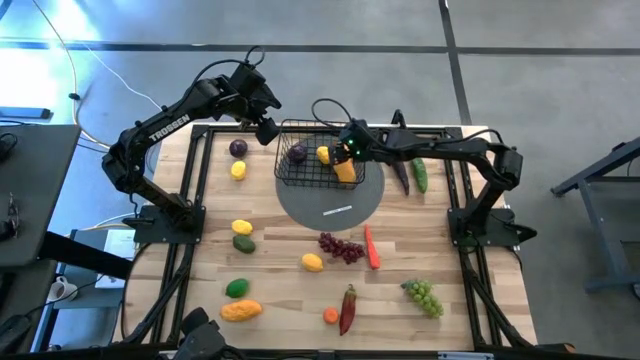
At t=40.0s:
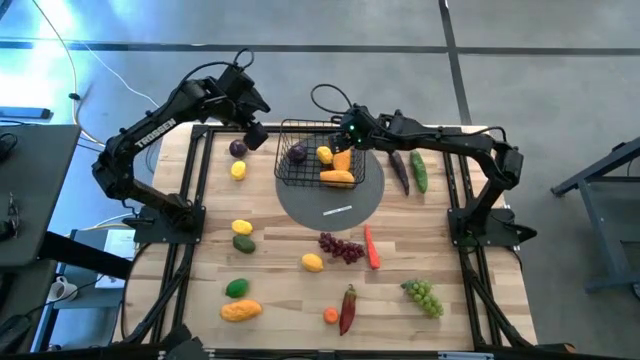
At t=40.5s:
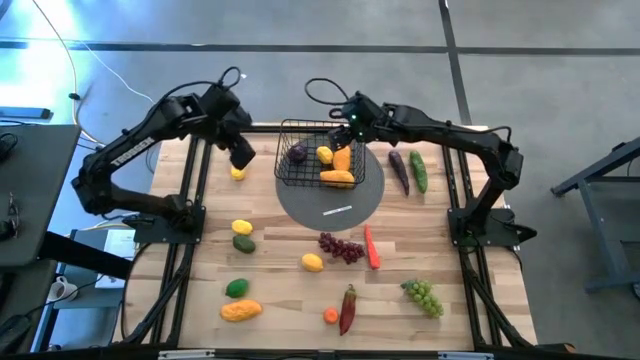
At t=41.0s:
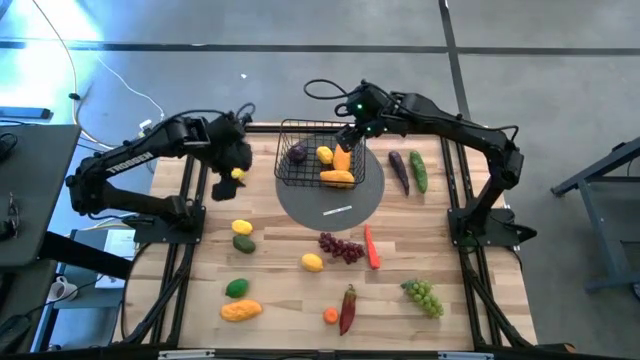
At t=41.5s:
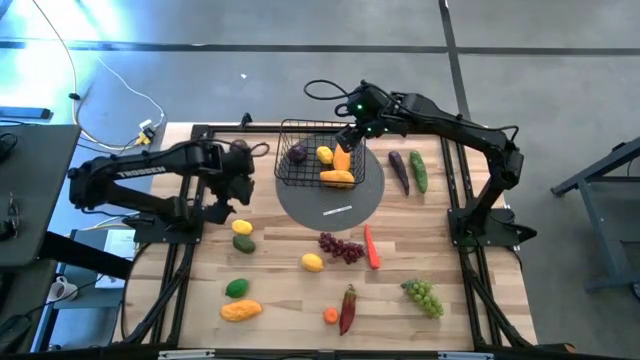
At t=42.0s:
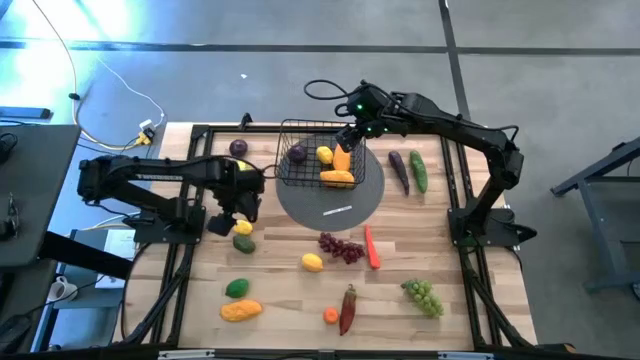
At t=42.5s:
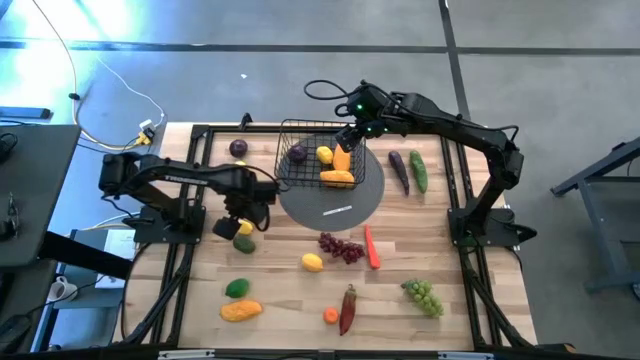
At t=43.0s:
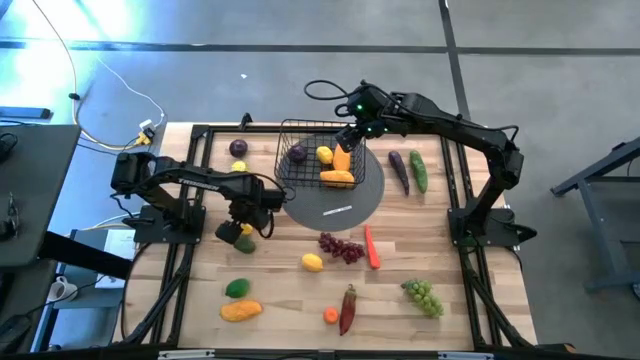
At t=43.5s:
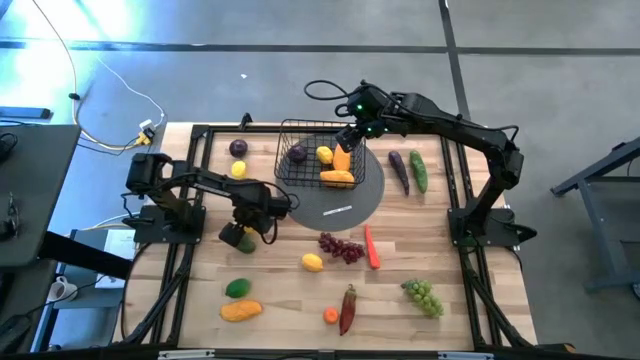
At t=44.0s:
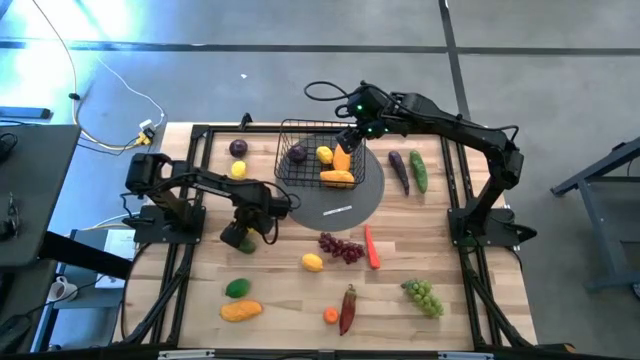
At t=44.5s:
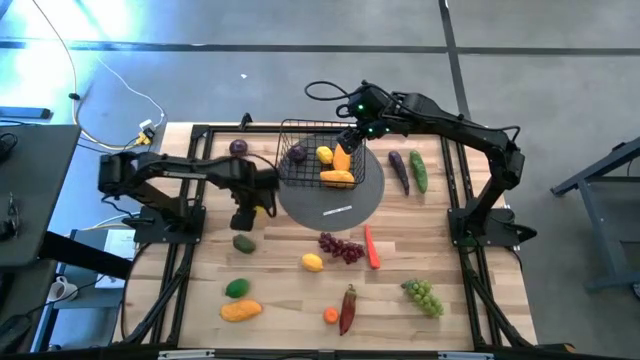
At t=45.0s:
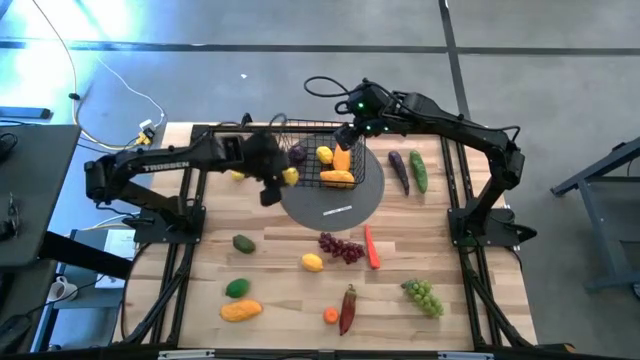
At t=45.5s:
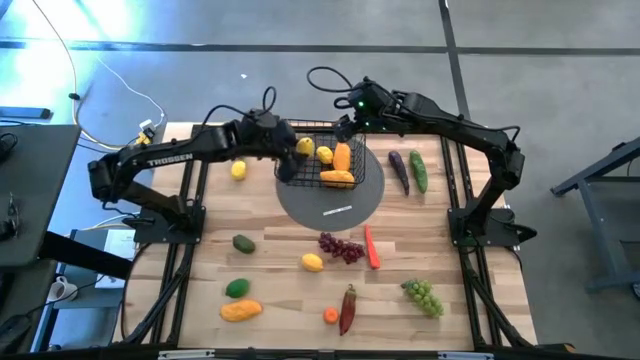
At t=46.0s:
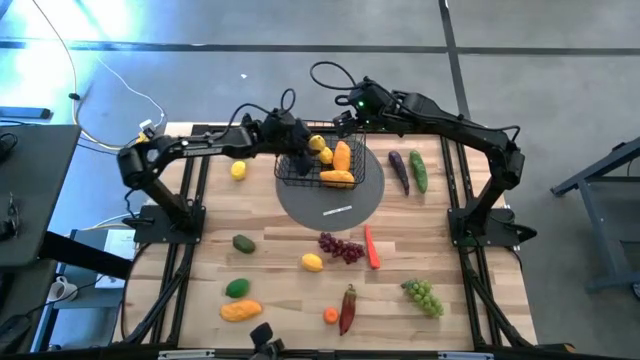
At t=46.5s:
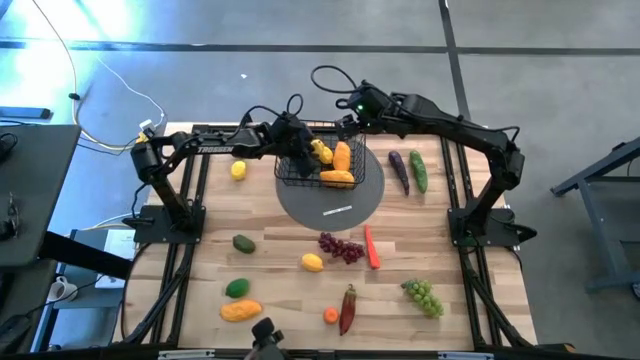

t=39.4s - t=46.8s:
Task: Build produce basket
Put the middle yellow lemon into the black wire basket

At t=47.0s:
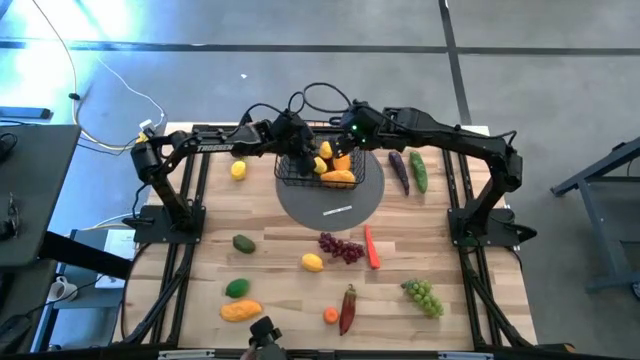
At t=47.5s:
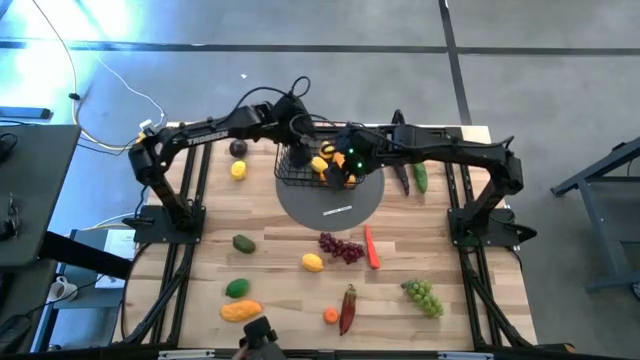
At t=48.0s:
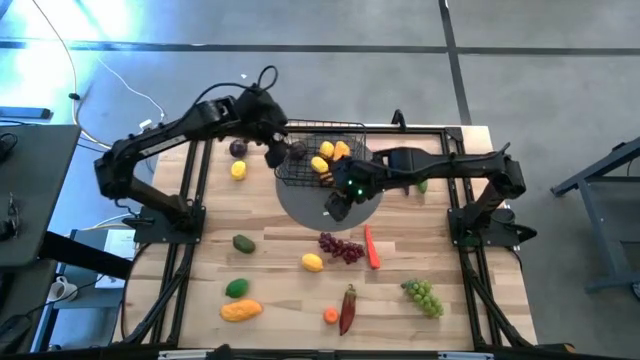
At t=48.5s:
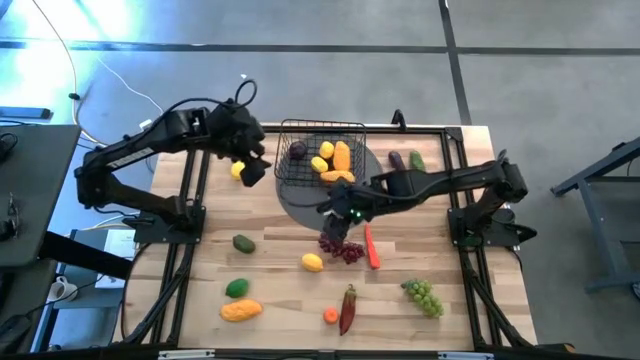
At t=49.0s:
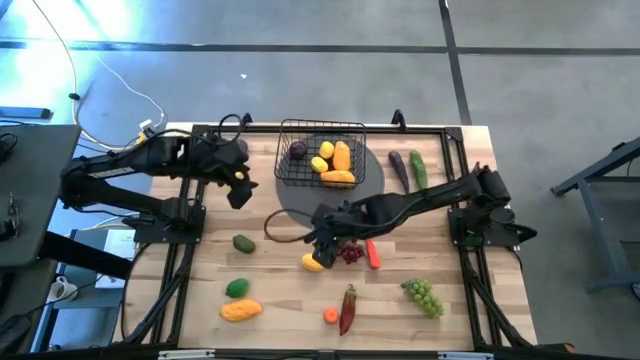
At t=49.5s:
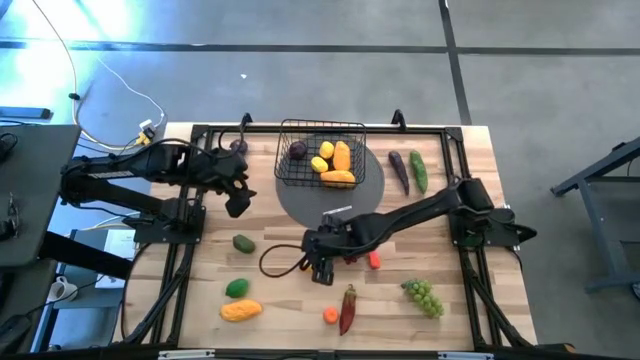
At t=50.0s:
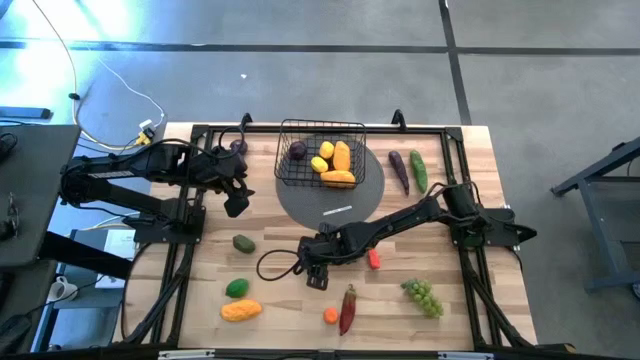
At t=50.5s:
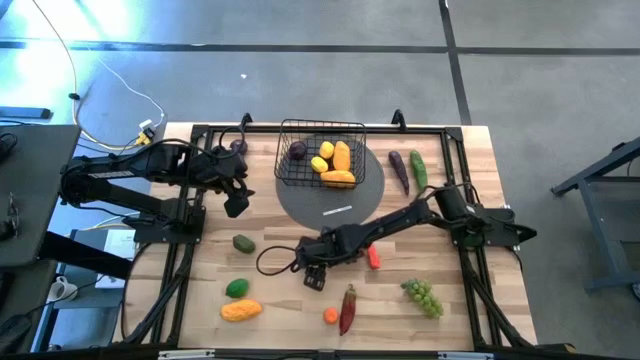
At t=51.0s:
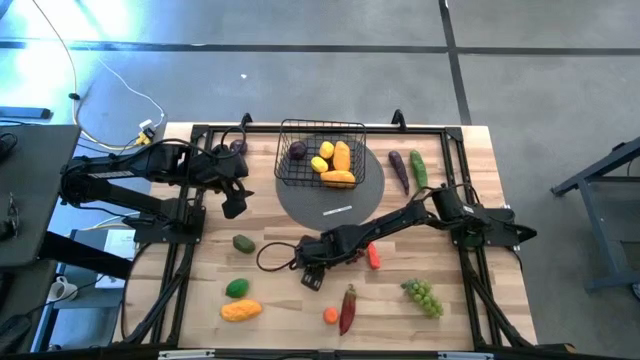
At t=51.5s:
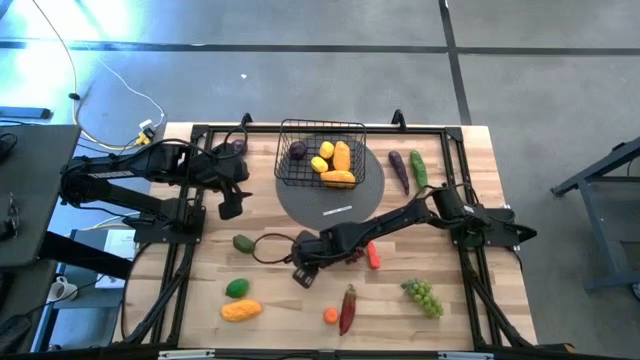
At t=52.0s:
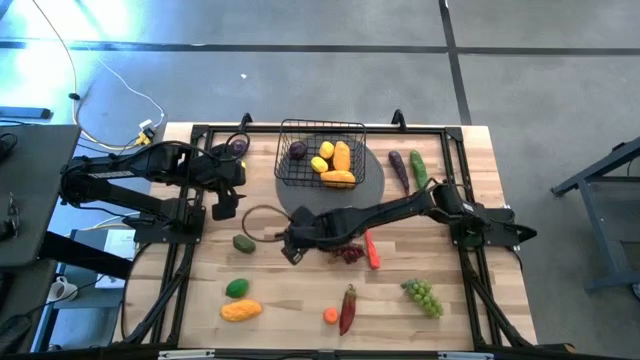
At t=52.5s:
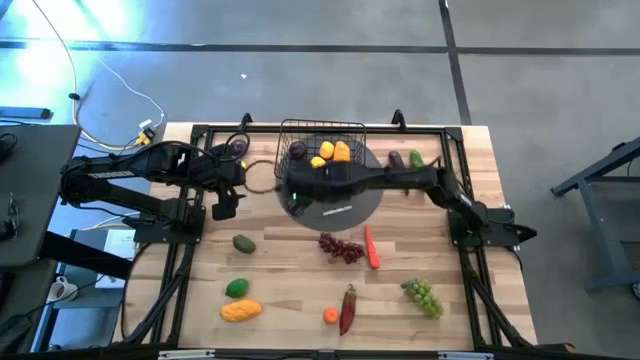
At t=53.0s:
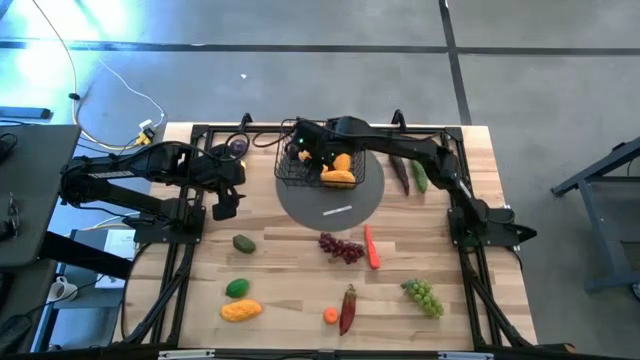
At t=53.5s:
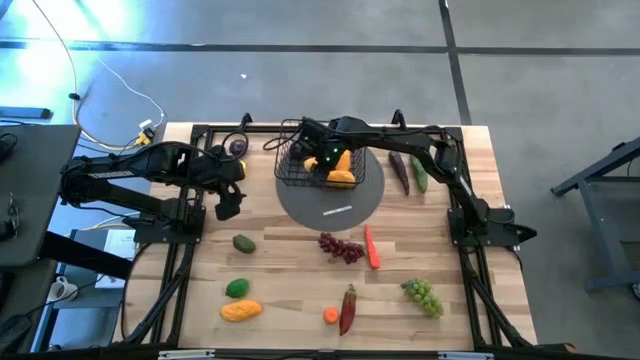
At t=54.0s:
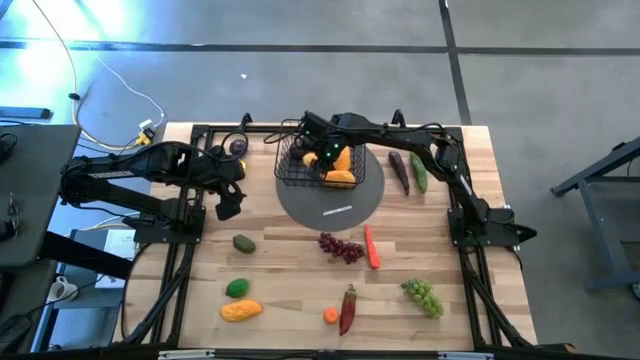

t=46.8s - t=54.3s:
Put the bottom yellow lemon into the black wire basket

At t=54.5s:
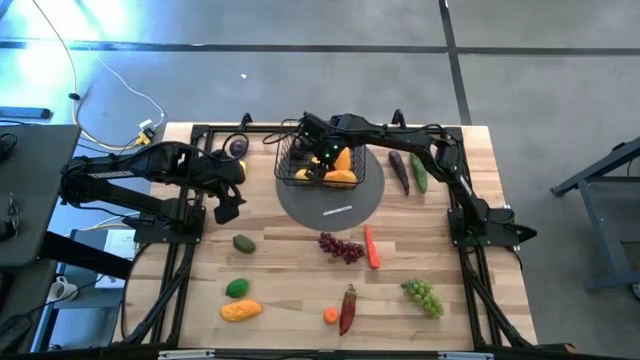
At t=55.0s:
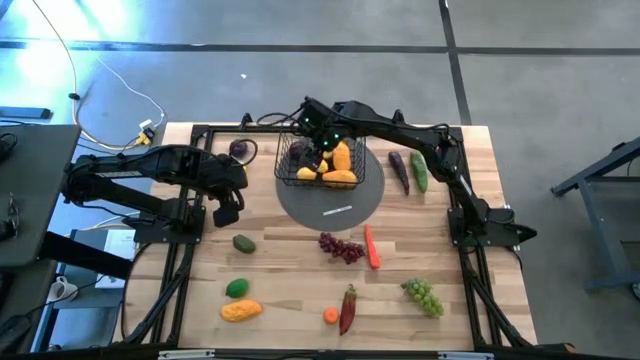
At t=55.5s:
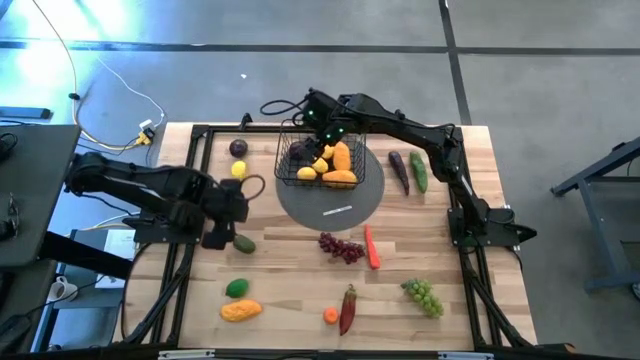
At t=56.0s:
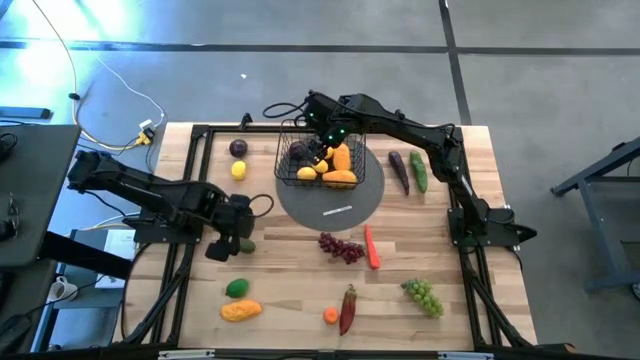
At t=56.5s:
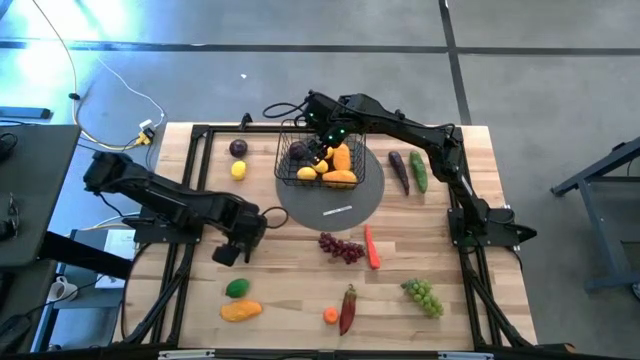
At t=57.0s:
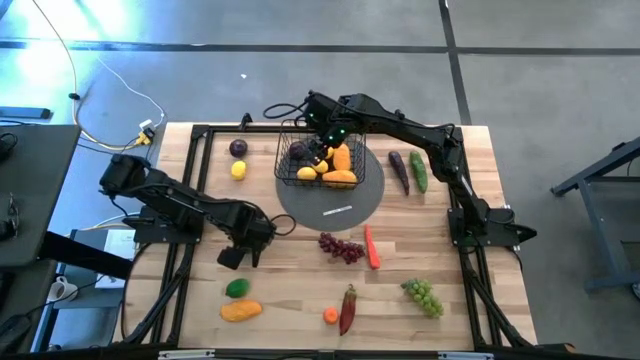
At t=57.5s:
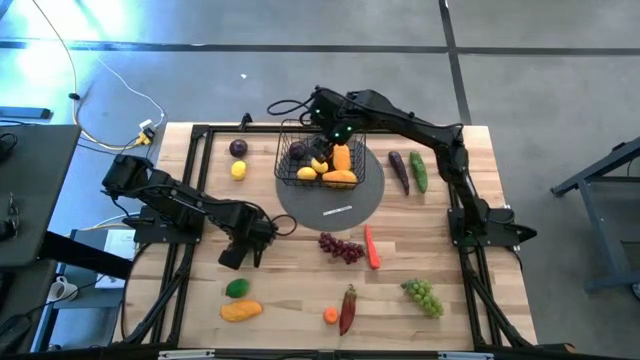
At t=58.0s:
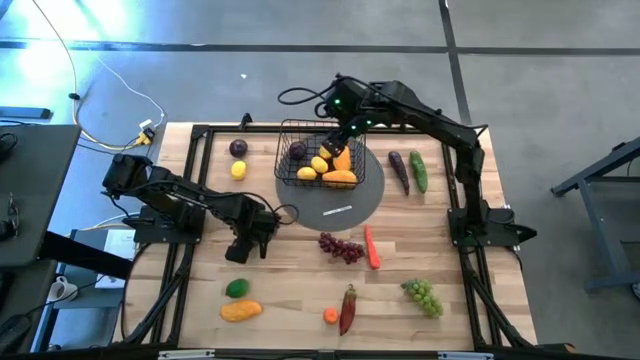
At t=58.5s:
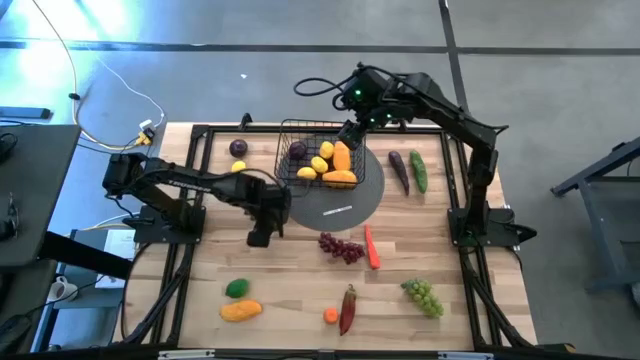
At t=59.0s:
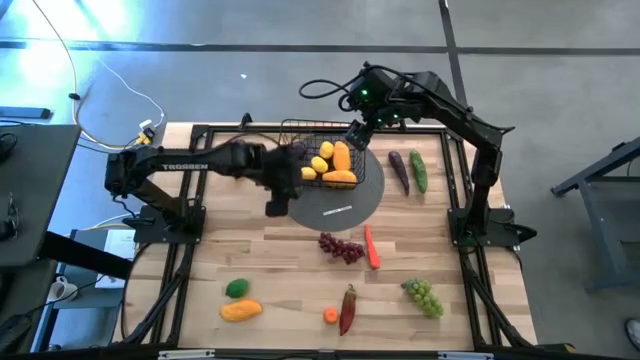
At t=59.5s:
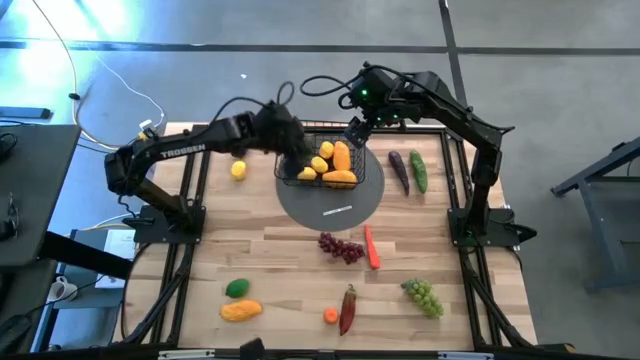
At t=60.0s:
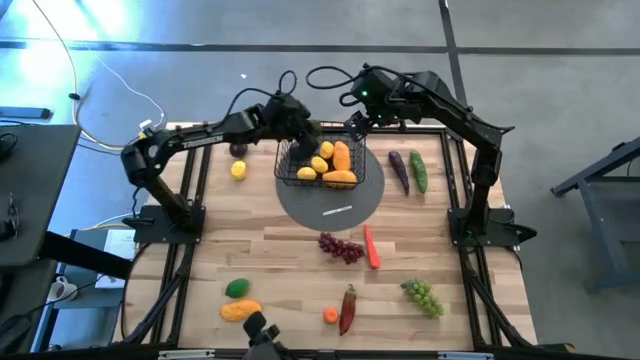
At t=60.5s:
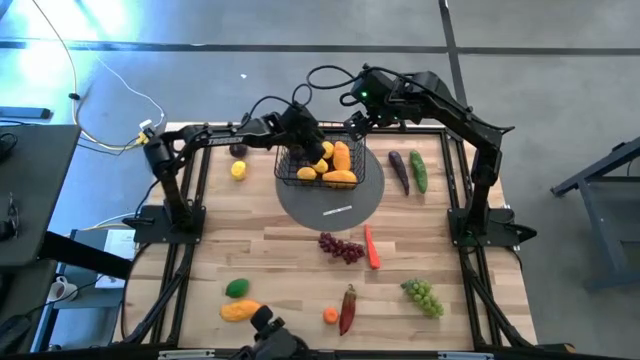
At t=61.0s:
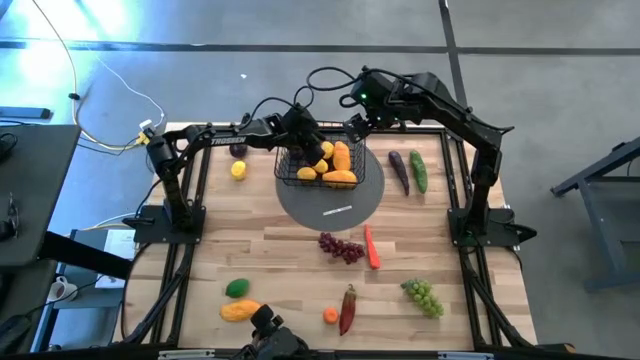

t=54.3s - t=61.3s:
Put the top green lime into the black wire basket
